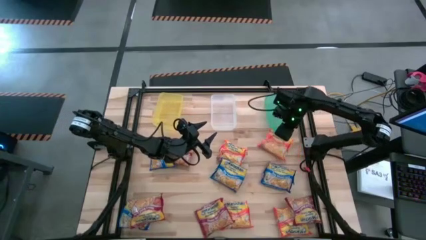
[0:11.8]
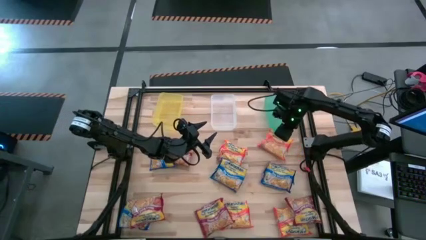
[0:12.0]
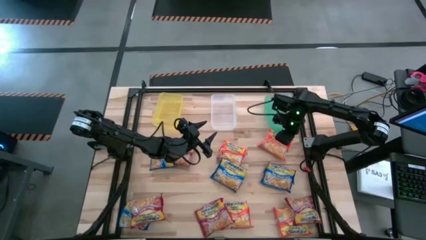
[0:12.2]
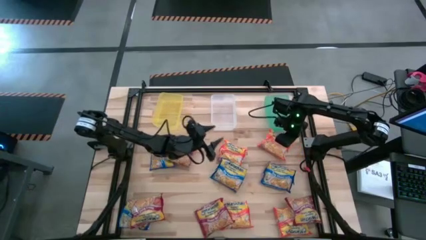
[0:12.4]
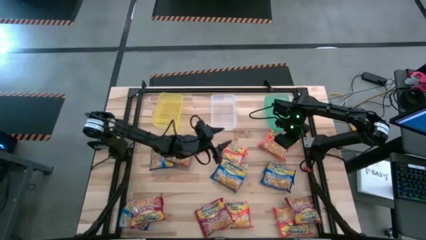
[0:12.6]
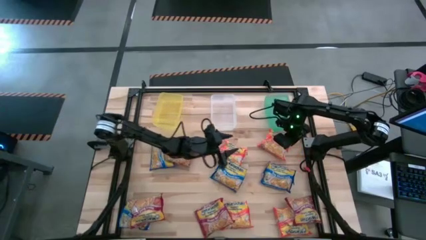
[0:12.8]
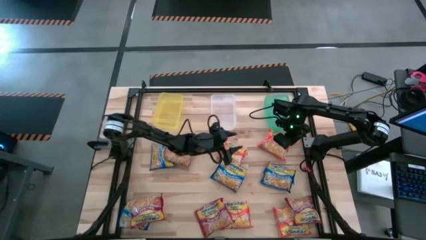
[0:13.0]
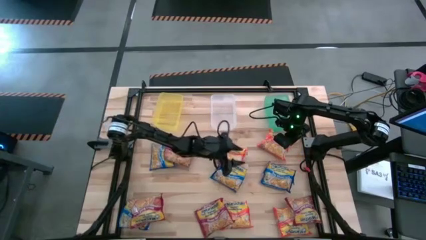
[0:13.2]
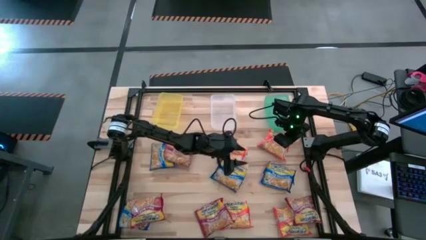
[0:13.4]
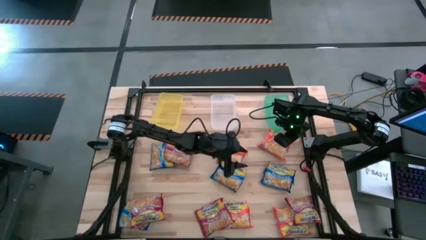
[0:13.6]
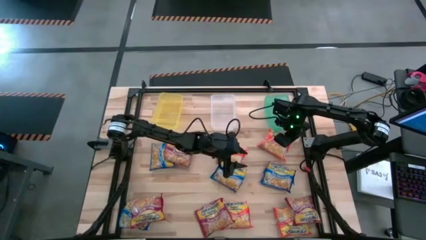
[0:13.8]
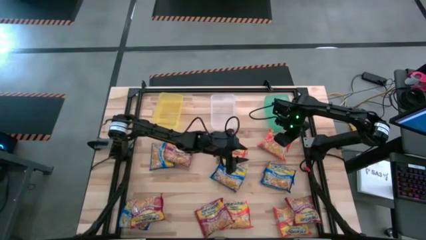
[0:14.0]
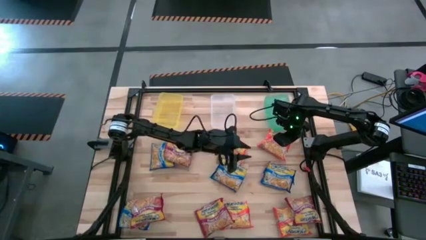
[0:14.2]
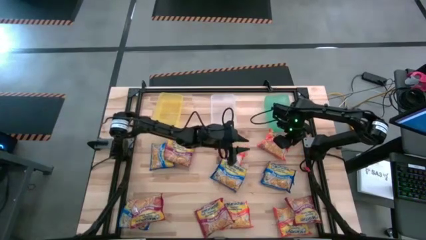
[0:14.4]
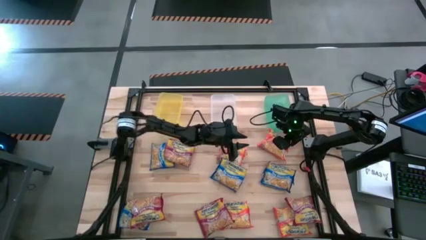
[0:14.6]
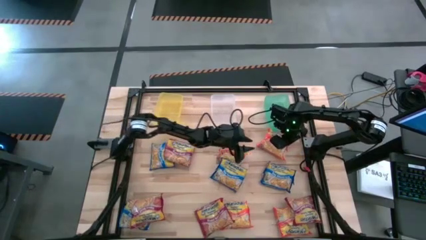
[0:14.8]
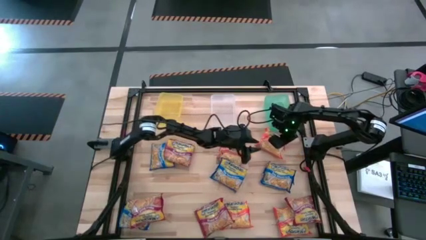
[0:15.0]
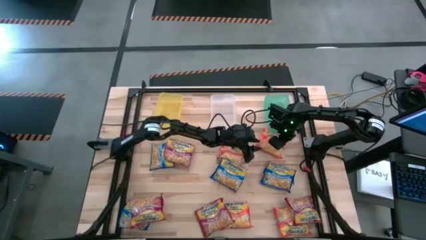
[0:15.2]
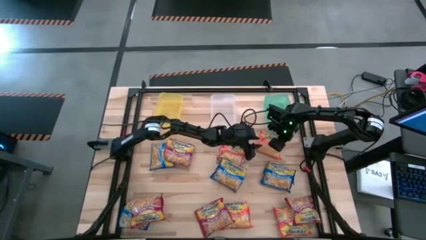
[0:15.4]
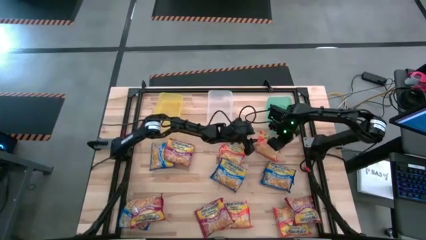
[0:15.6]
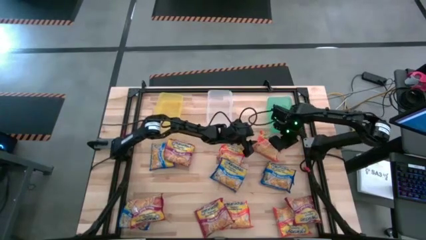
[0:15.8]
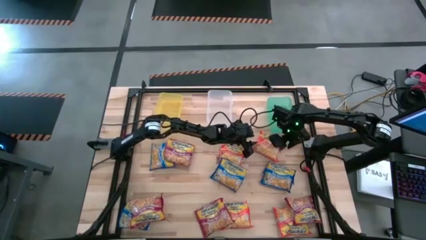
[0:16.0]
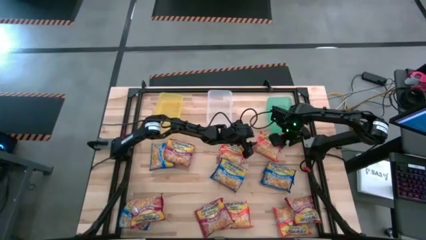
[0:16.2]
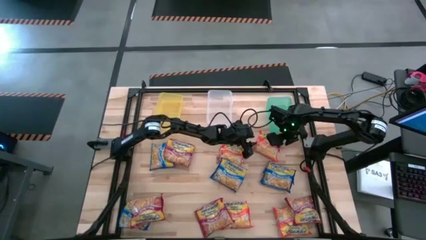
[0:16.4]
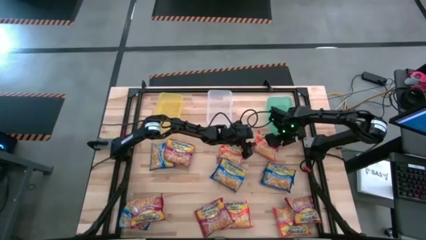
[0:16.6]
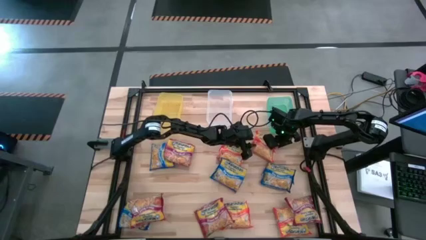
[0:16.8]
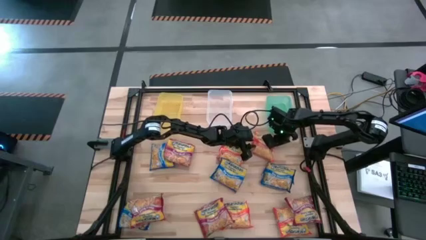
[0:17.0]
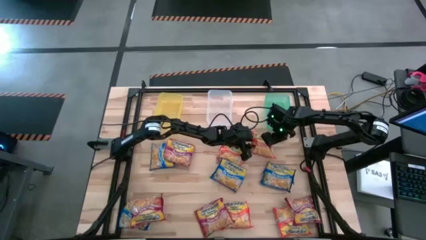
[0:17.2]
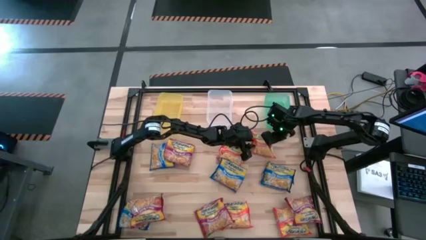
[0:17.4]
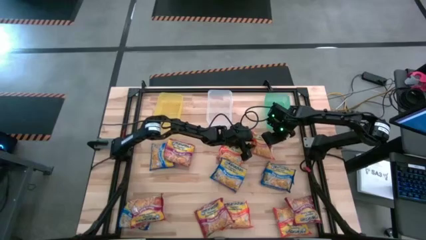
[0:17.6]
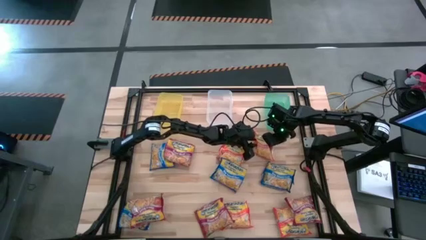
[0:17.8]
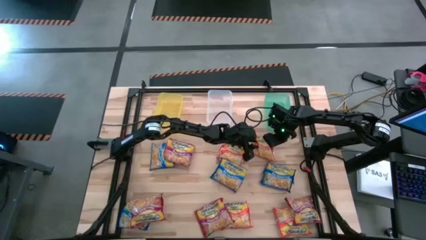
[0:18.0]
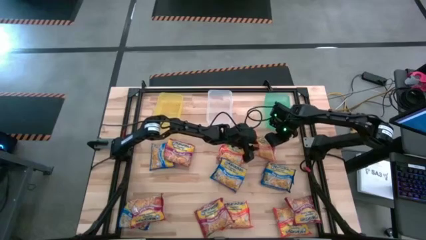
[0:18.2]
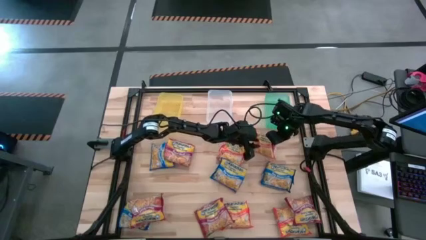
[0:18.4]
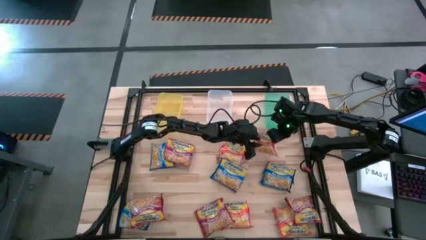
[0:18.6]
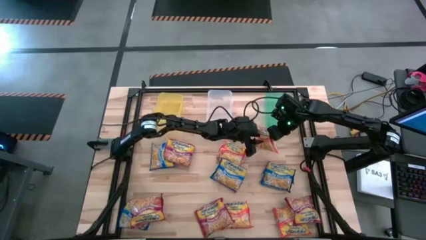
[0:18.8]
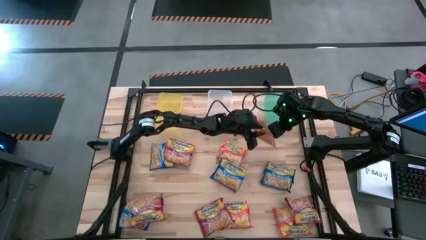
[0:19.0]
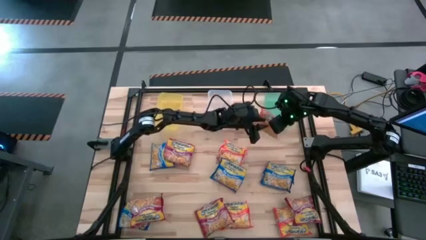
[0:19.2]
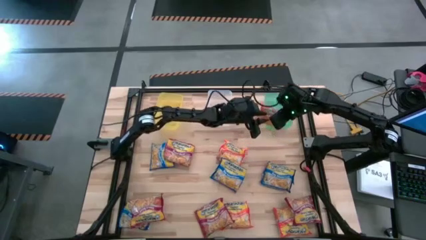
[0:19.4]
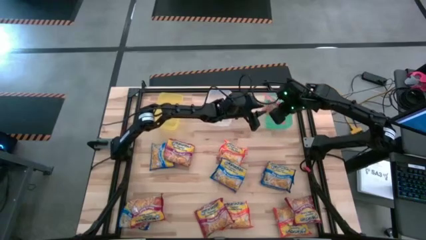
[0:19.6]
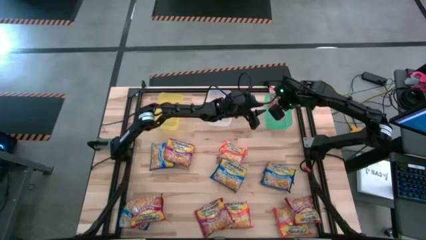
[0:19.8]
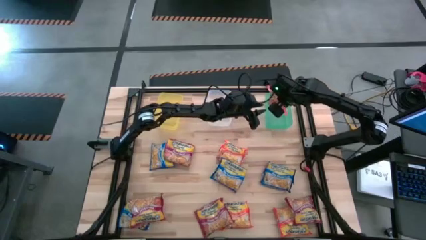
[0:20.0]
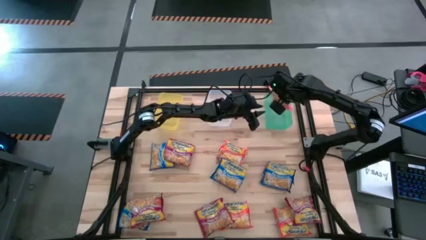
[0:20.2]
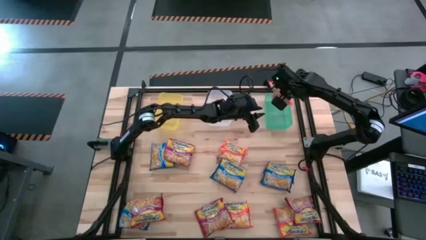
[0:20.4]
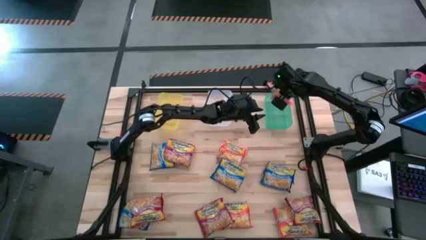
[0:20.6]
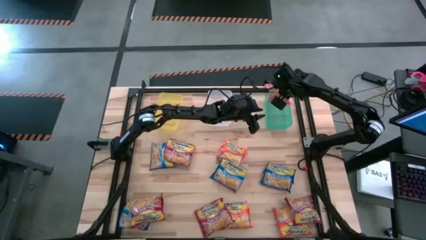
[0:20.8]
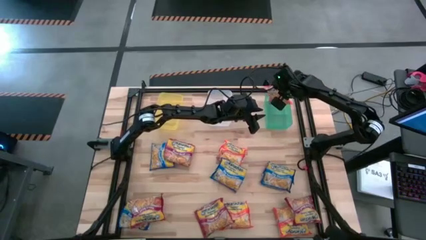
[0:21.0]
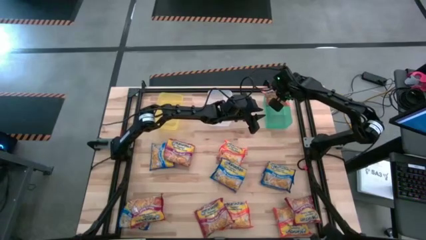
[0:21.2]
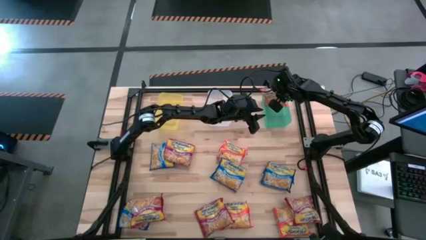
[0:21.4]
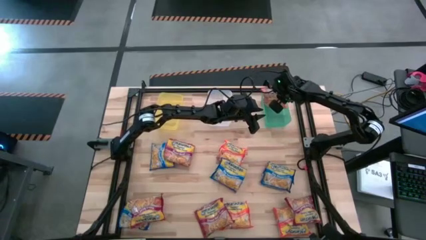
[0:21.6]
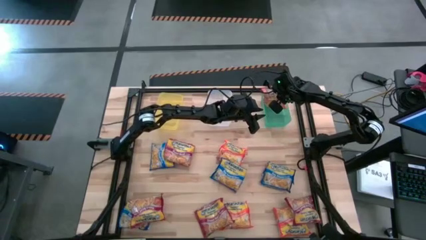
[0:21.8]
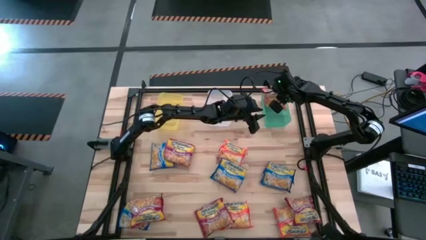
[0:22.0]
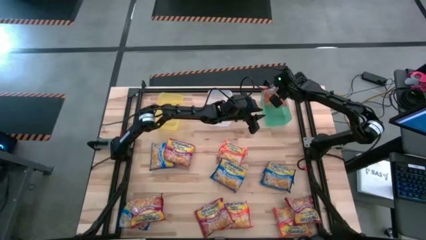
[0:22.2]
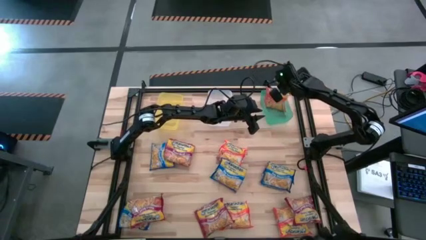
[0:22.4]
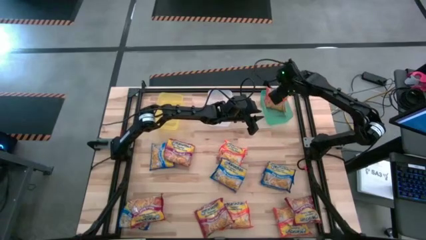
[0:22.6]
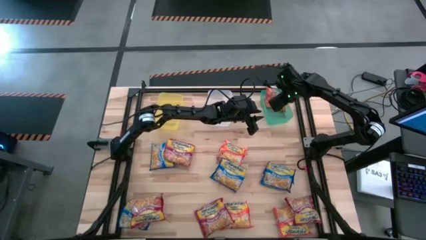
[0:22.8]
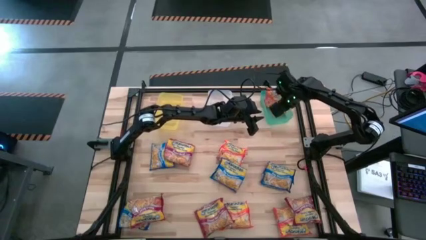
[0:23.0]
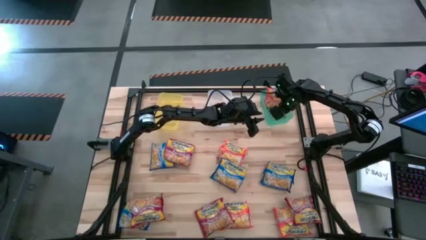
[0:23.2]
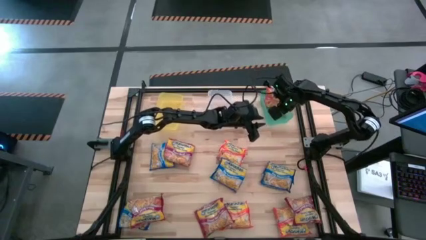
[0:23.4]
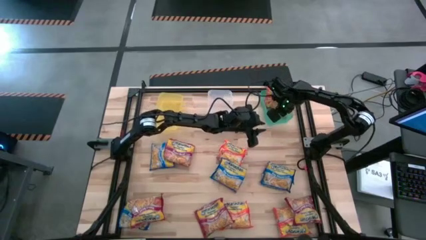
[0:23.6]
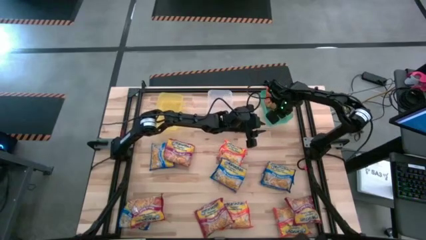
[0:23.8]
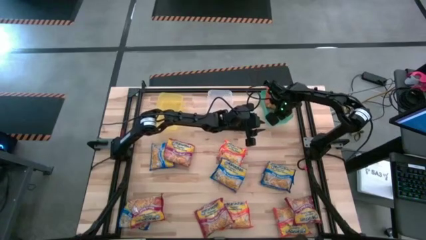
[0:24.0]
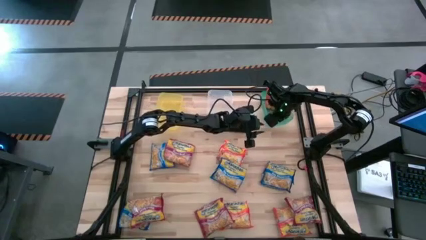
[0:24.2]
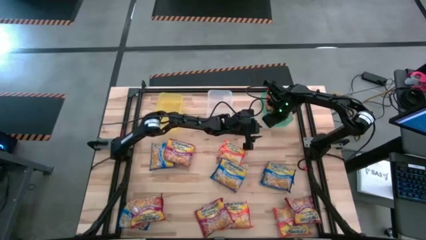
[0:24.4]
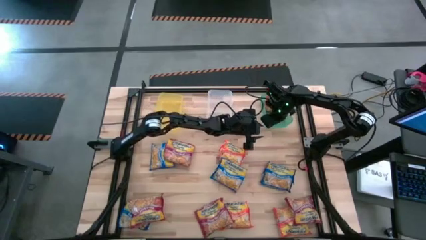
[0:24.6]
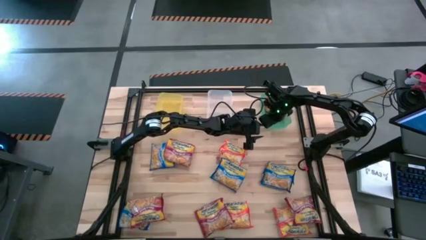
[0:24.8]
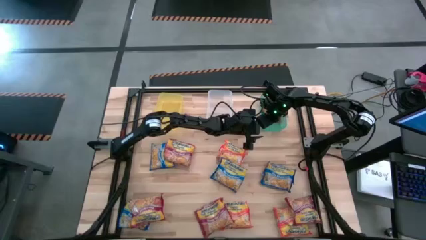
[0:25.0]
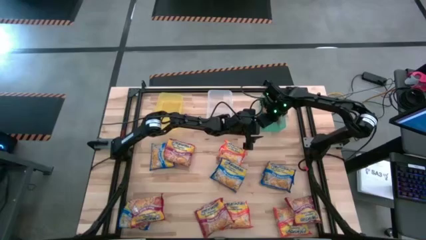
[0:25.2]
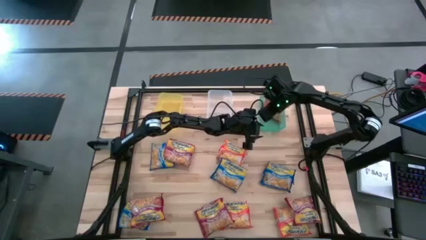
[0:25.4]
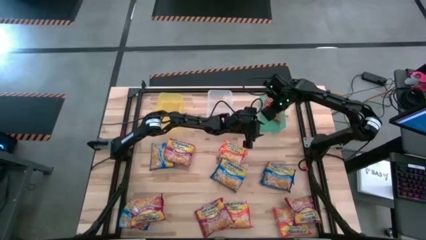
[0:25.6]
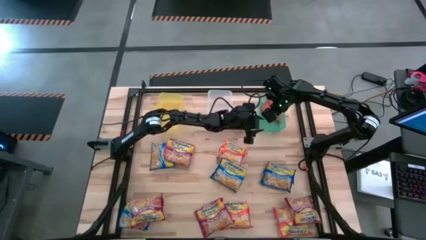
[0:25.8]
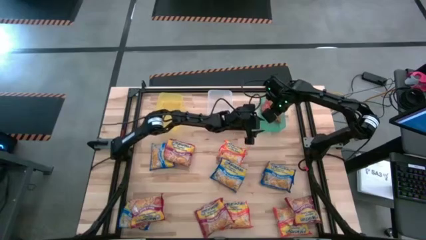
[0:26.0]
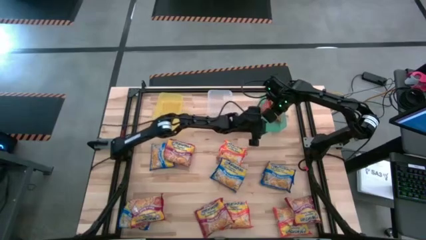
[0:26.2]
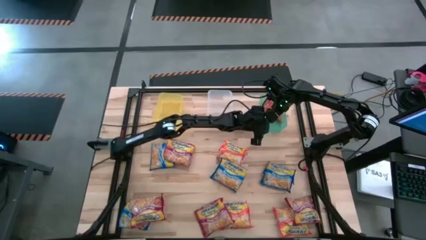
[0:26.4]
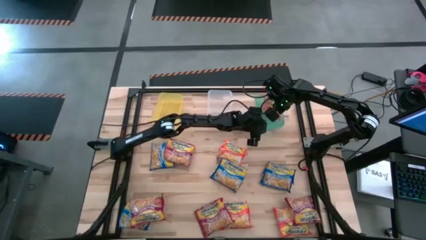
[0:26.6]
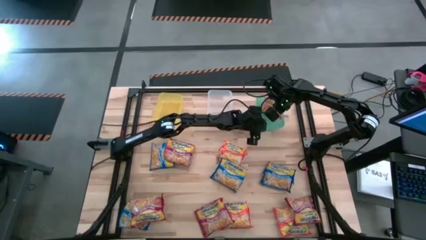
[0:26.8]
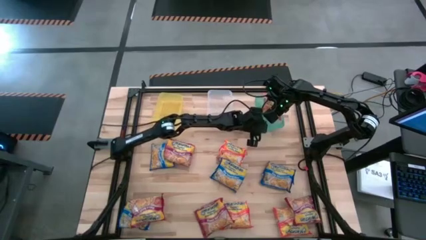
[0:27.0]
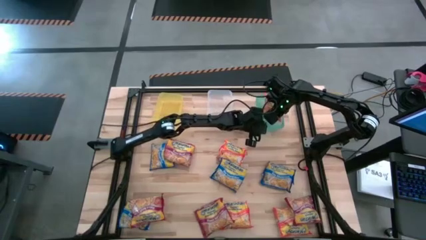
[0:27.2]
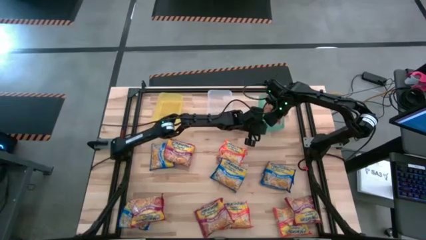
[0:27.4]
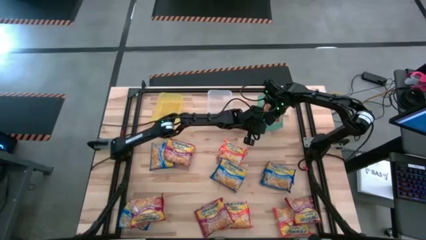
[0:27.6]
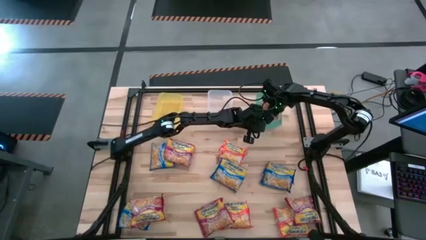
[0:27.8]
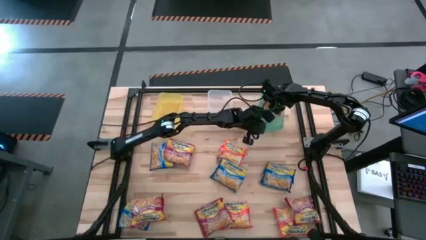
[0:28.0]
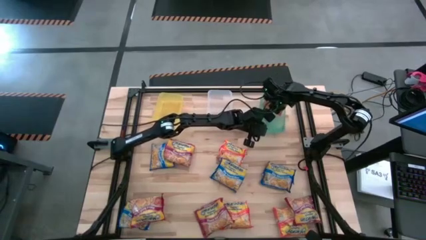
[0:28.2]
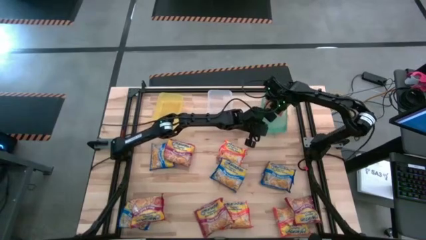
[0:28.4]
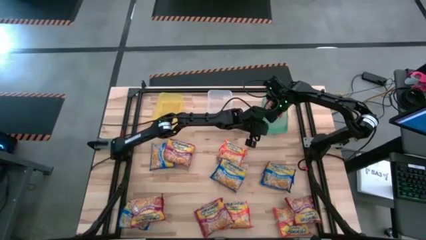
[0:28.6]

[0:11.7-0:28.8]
Task: Sort Maruchan noodles
Put the top right orange noodle pack into the green bin
